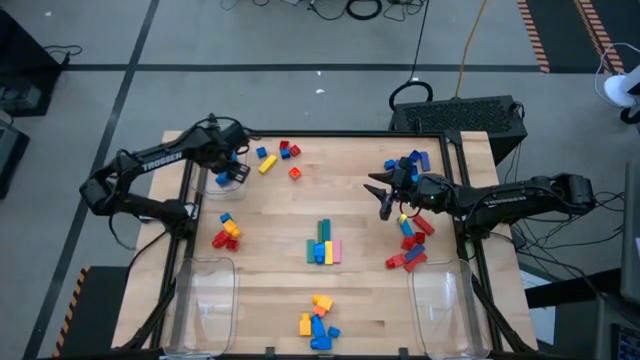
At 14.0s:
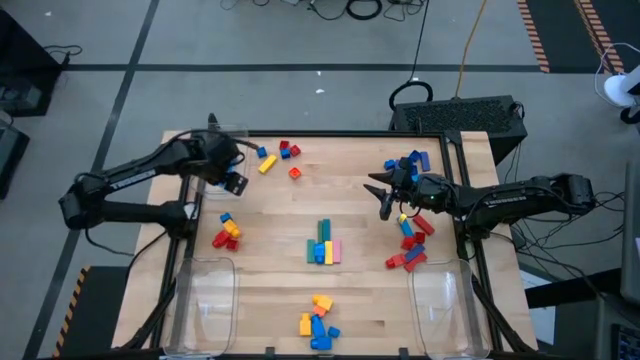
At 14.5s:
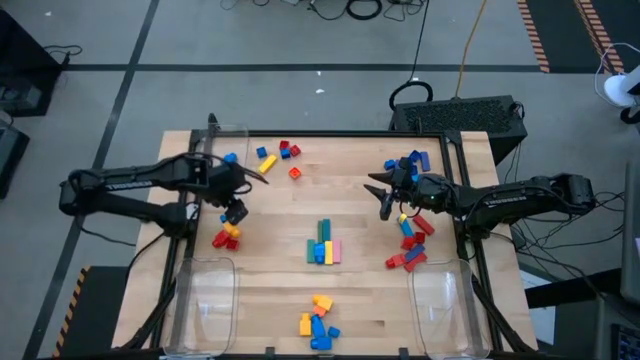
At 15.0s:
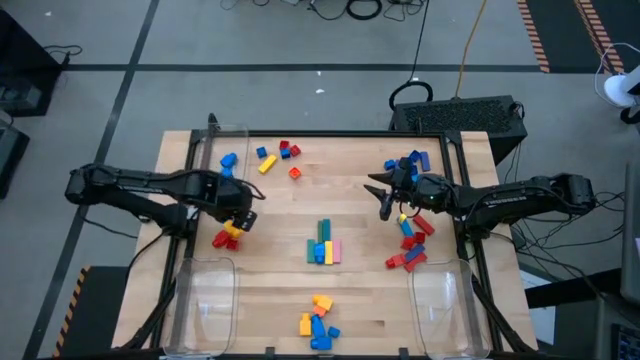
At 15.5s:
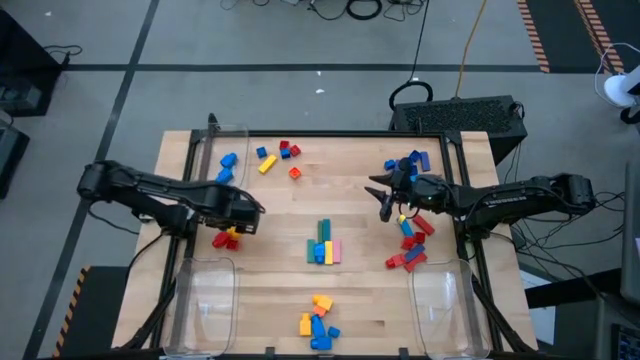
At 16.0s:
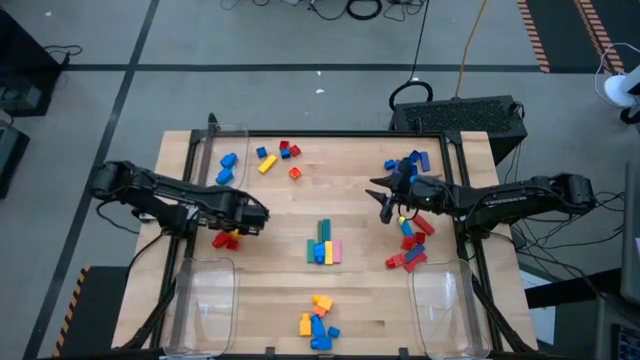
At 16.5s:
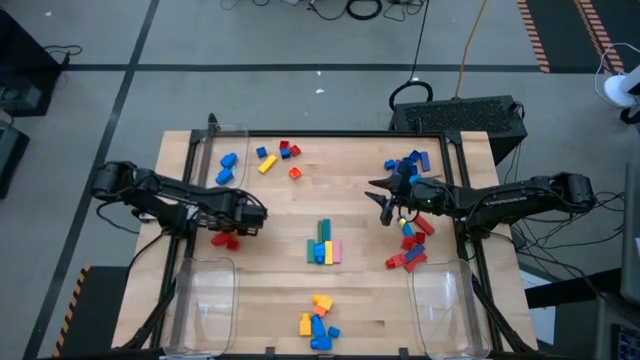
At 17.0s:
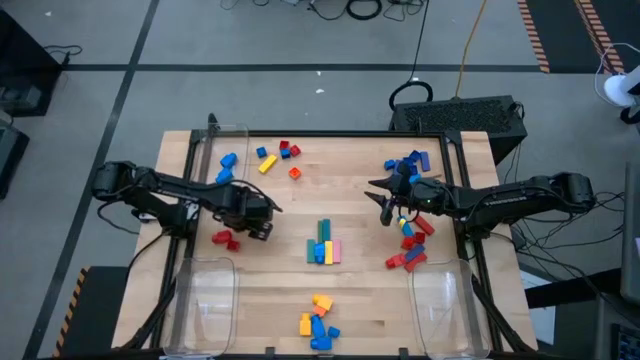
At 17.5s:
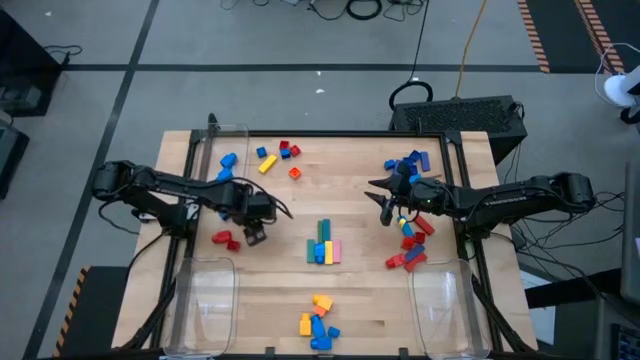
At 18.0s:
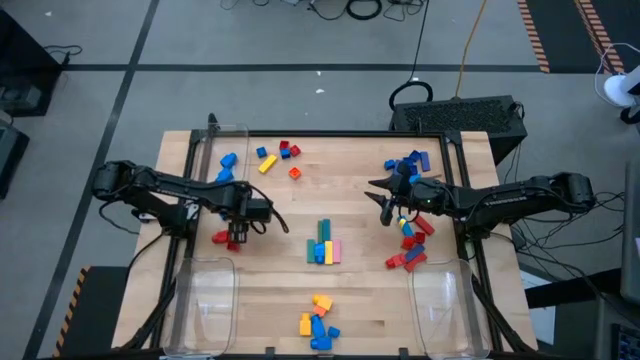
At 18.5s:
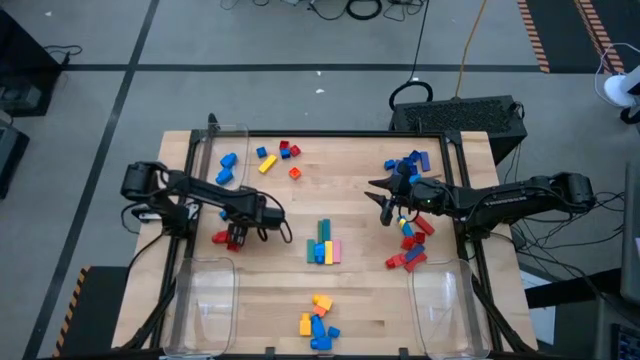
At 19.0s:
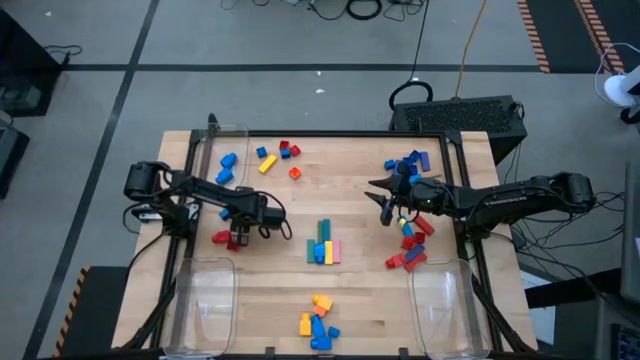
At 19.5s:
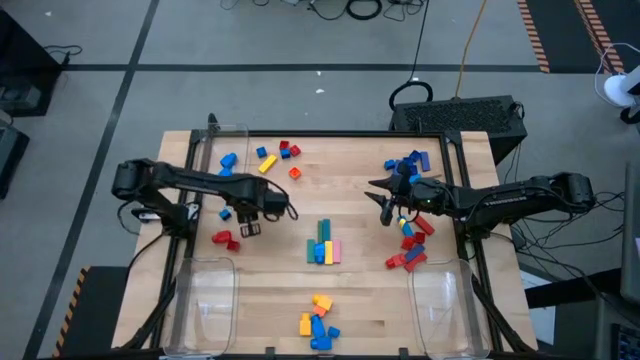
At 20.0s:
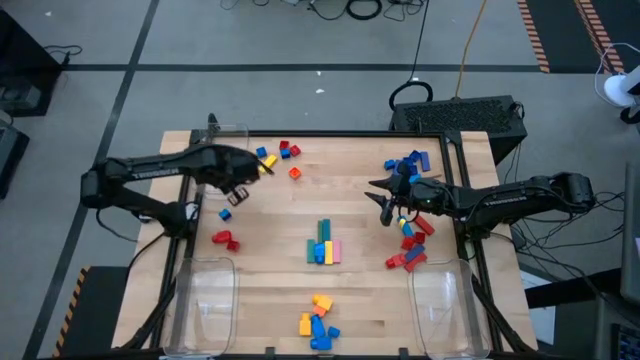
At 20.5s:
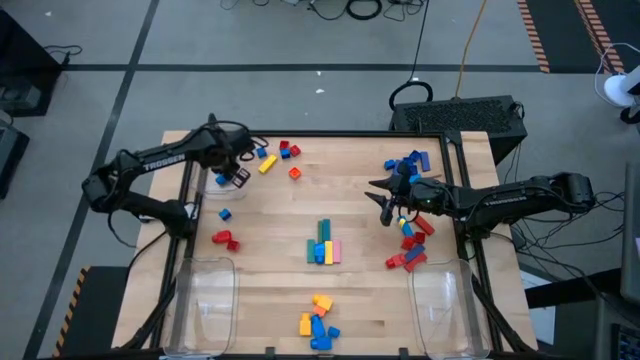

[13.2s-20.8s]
Task: Sort blocks by size
Put the yellow one stud game piece into the top left transparent bin

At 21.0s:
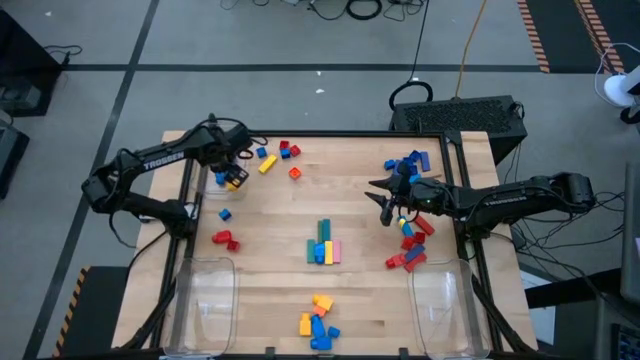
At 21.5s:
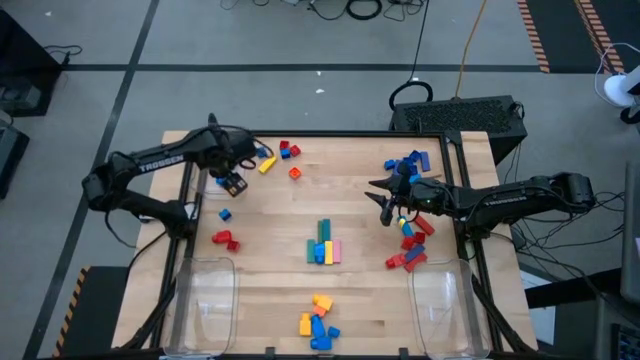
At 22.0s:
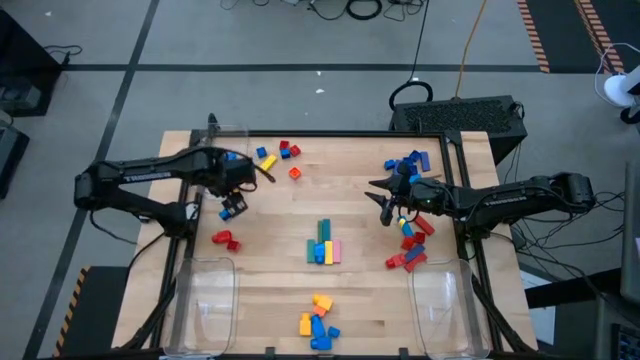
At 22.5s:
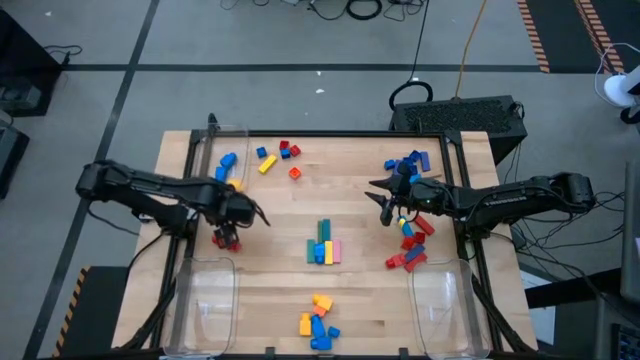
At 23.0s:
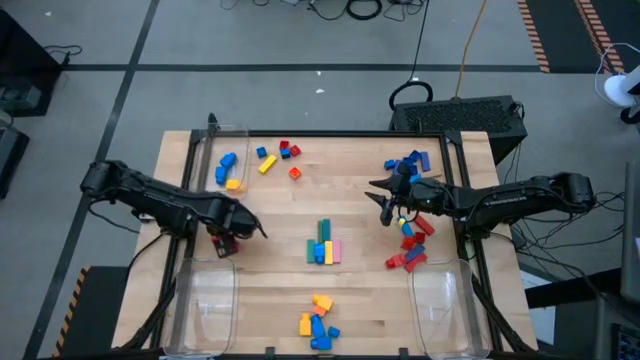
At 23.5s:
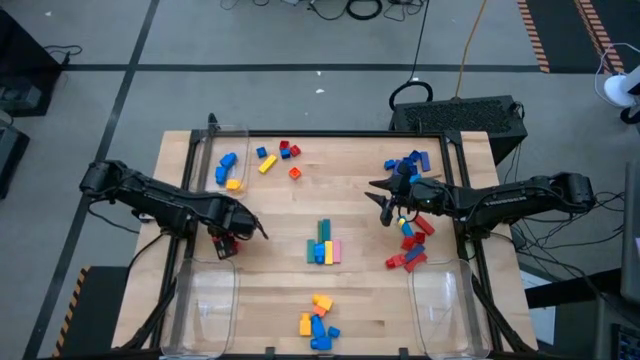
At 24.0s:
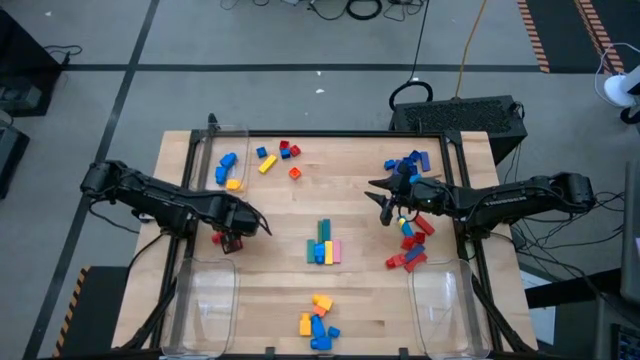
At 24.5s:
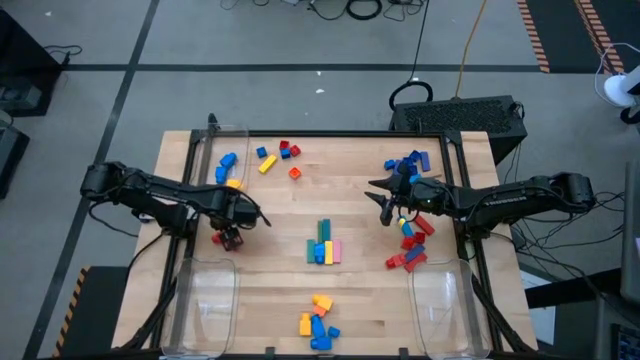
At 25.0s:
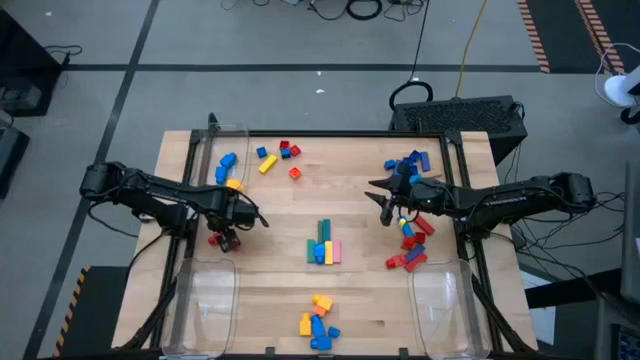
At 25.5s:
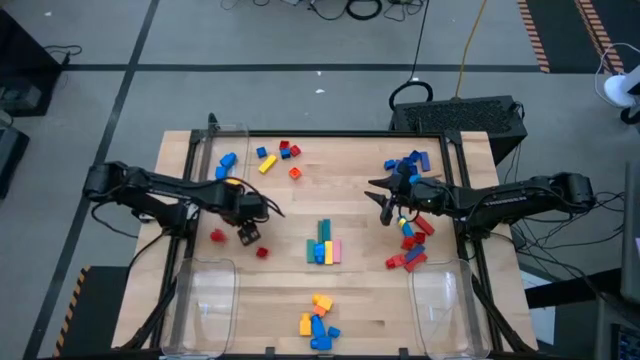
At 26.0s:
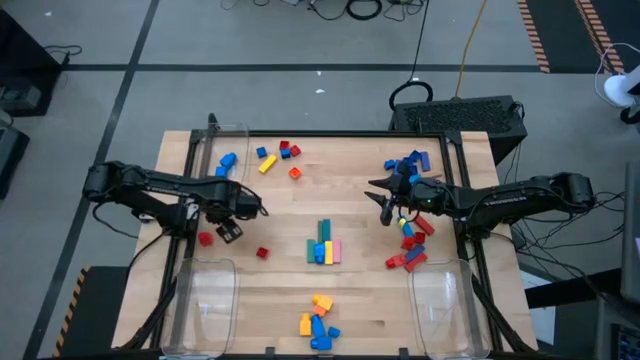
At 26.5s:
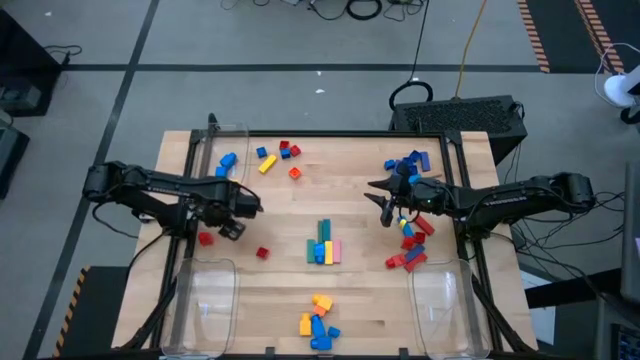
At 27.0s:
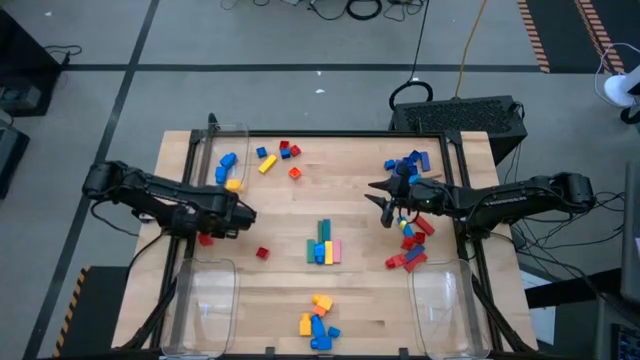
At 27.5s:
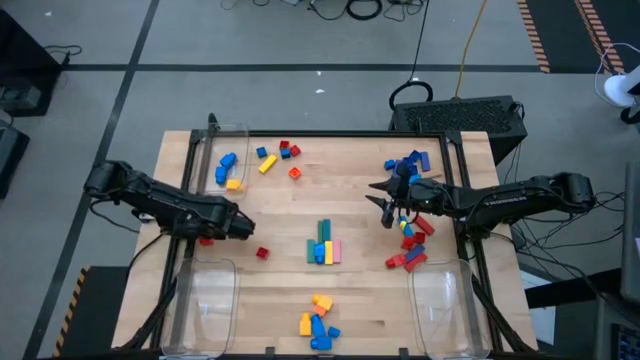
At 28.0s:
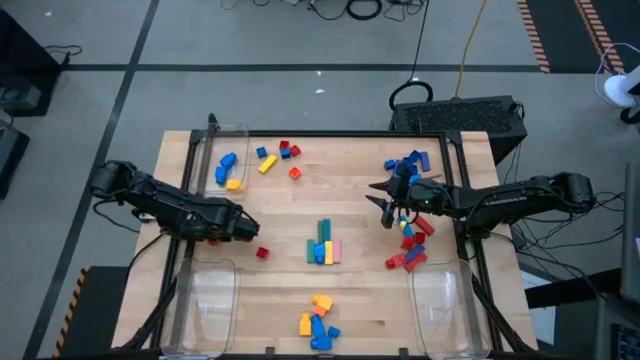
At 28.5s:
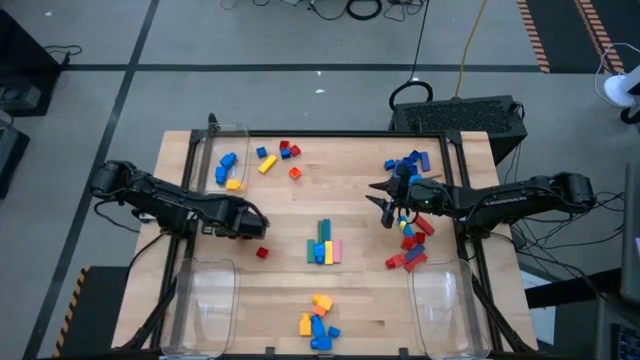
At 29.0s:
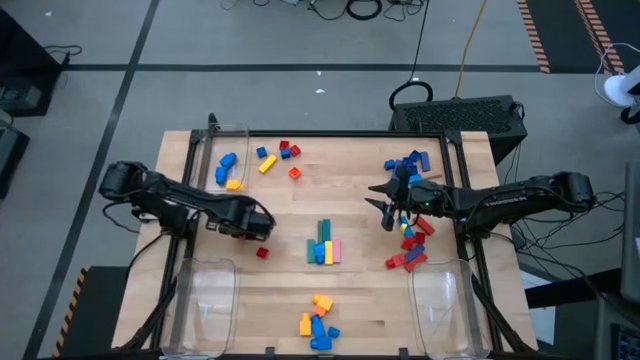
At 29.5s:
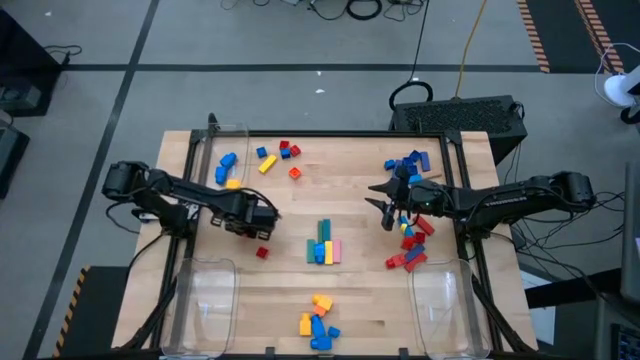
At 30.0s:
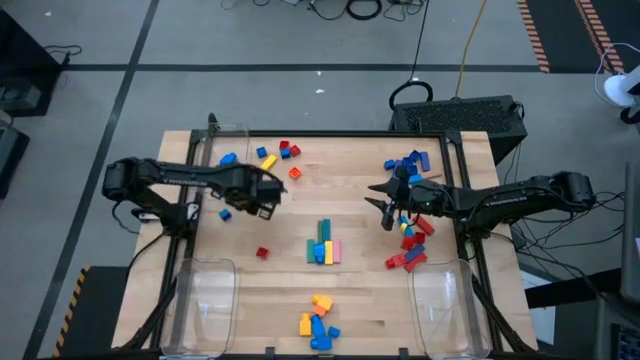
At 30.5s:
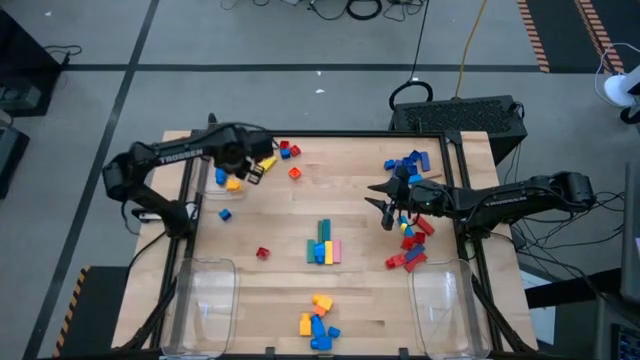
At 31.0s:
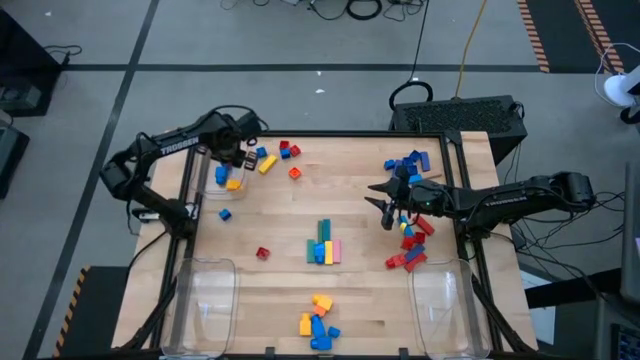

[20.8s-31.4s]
Put the red one stud game piece into the top left transparent bin

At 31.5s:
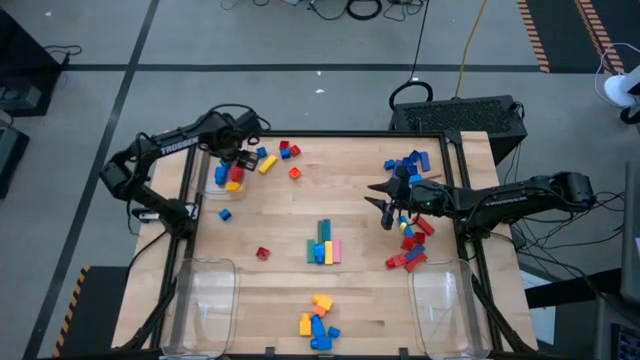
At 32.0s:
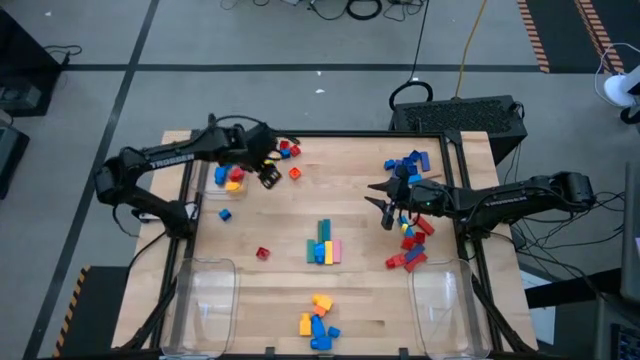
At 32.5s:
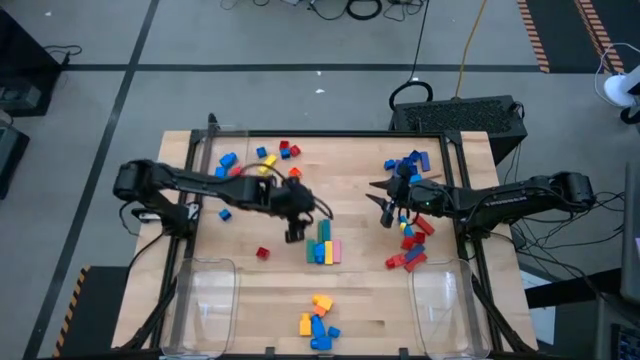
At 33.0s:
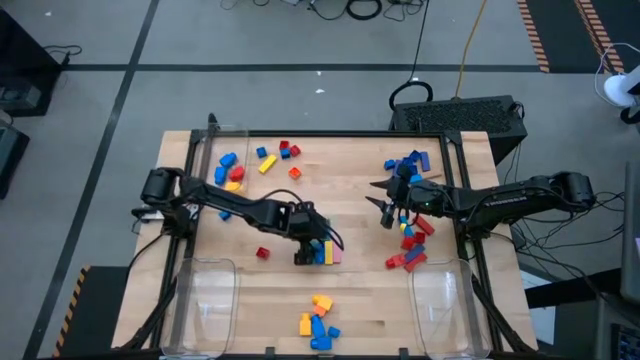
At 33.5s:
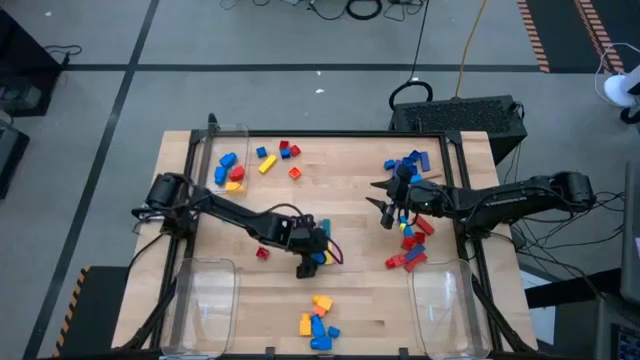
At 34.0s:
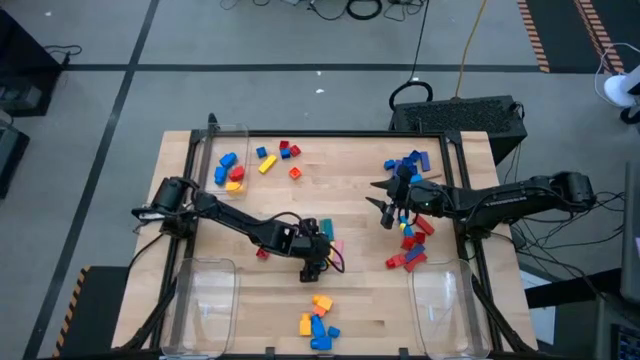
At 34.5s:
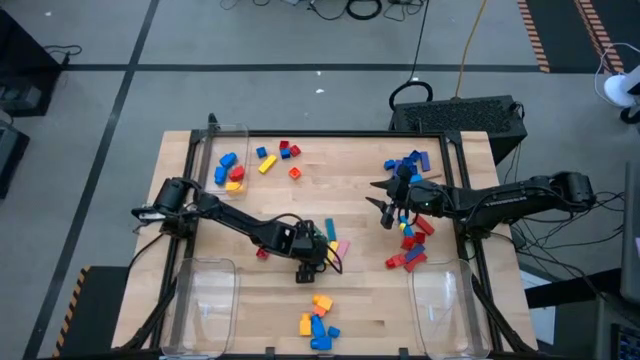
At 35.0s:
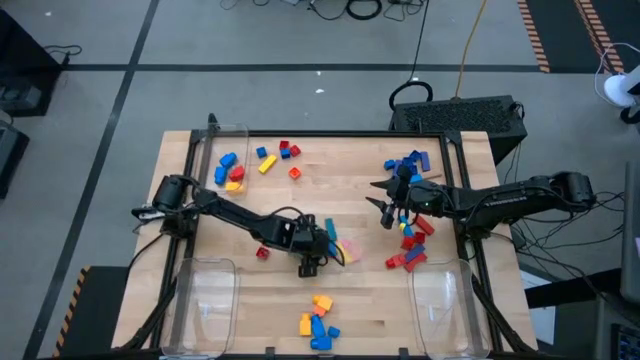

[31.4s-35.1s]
Put the blue one stud game piece into the top left transparent bin
